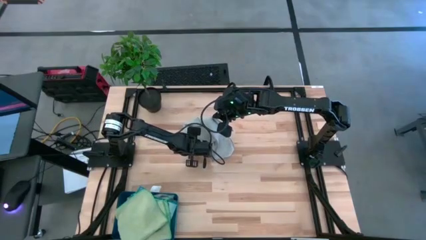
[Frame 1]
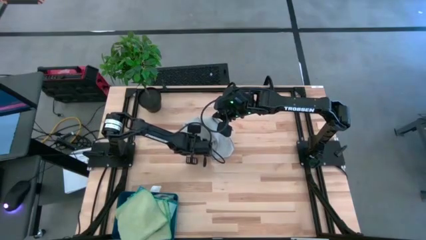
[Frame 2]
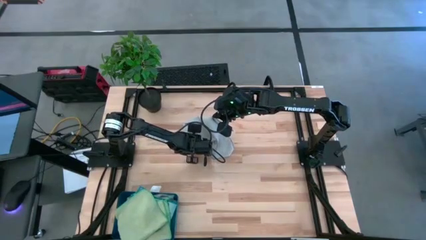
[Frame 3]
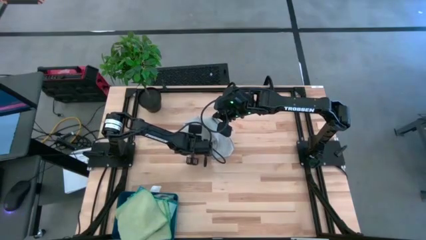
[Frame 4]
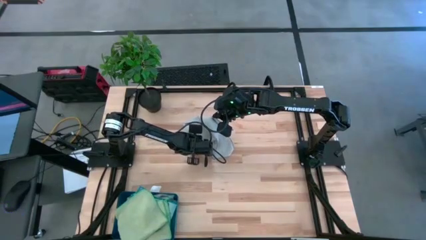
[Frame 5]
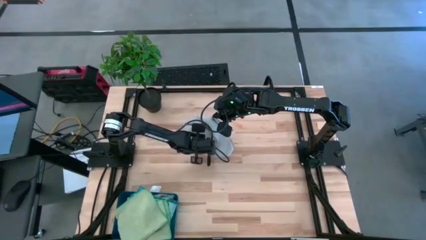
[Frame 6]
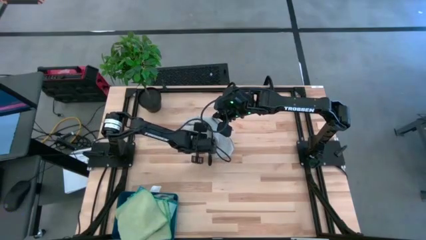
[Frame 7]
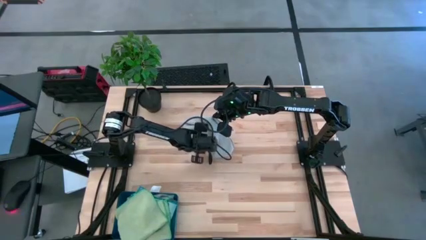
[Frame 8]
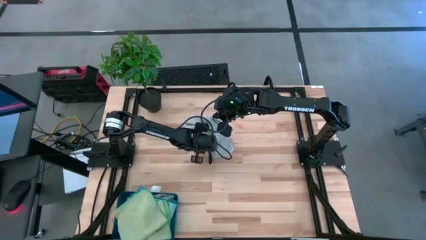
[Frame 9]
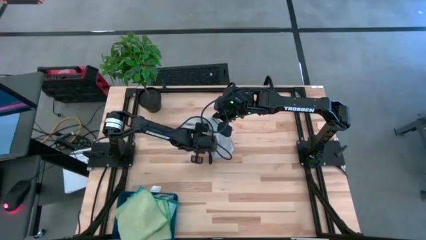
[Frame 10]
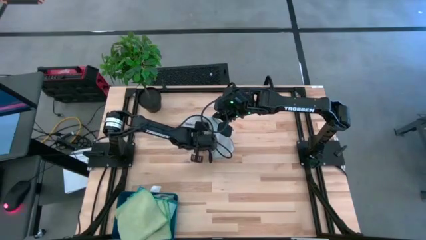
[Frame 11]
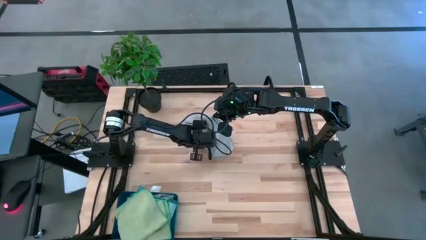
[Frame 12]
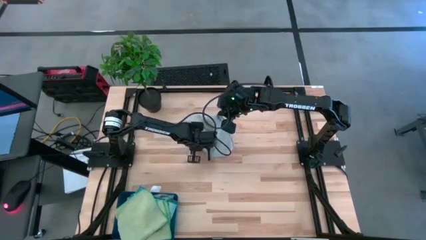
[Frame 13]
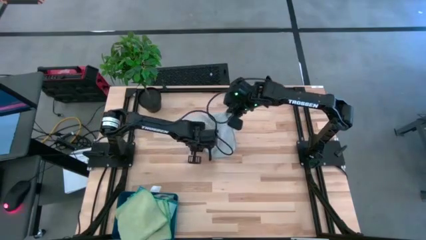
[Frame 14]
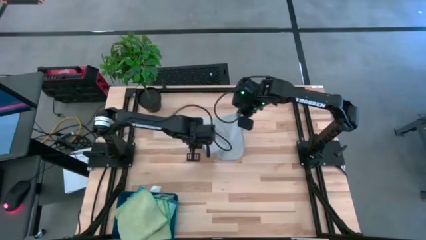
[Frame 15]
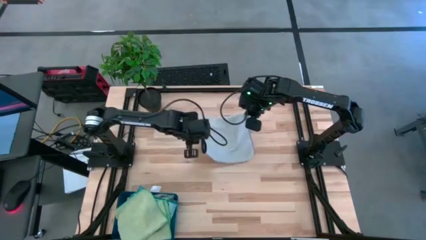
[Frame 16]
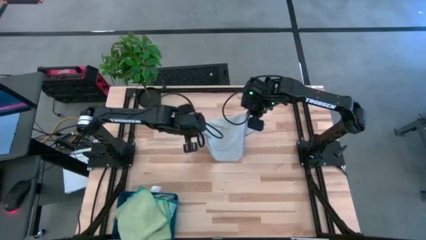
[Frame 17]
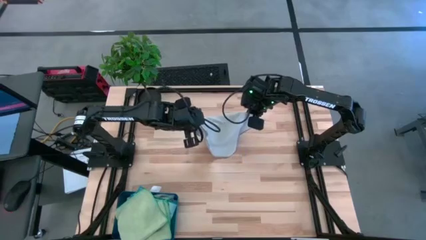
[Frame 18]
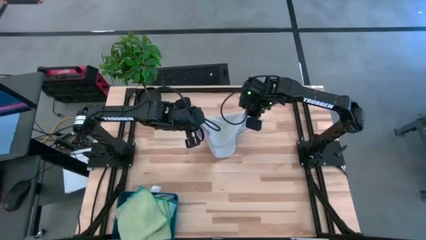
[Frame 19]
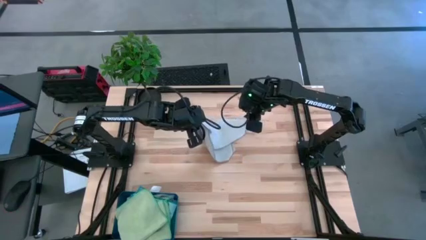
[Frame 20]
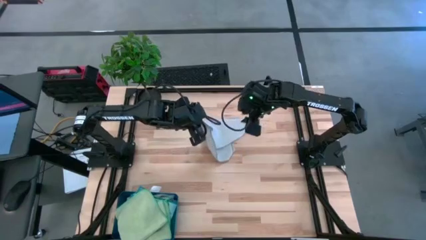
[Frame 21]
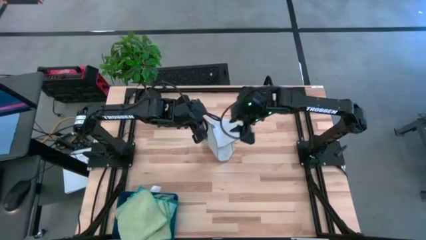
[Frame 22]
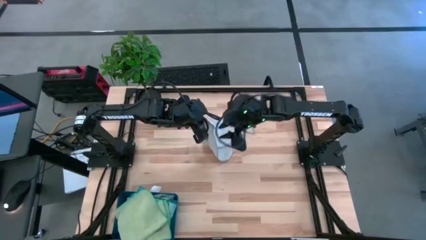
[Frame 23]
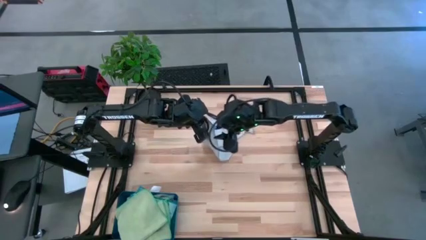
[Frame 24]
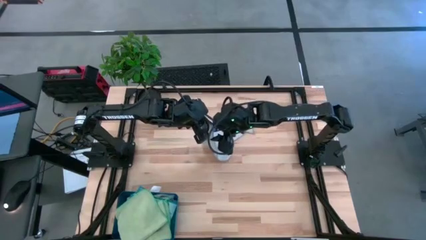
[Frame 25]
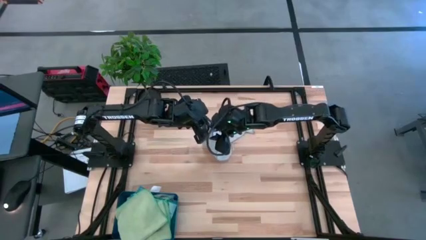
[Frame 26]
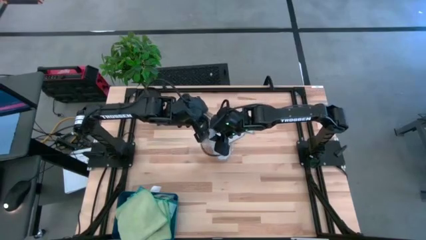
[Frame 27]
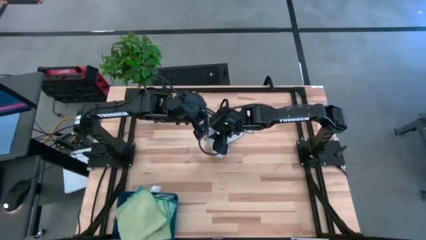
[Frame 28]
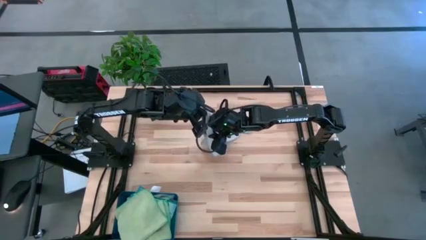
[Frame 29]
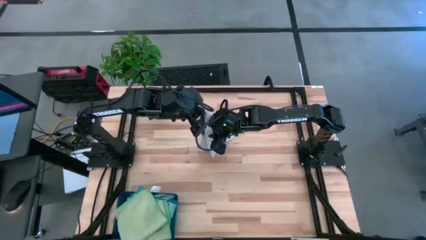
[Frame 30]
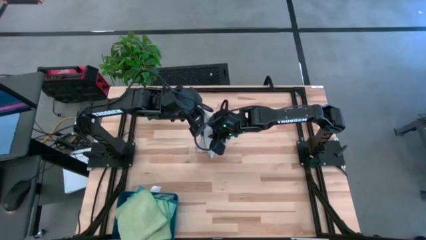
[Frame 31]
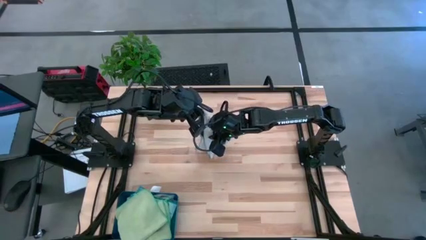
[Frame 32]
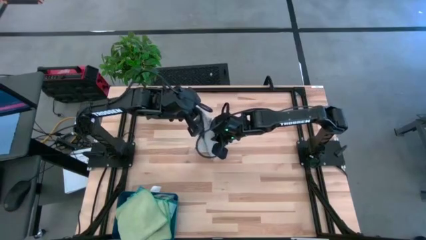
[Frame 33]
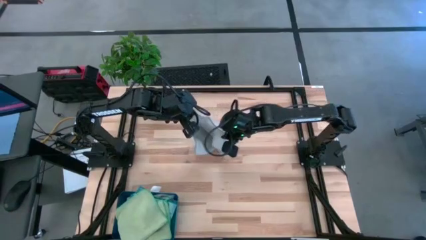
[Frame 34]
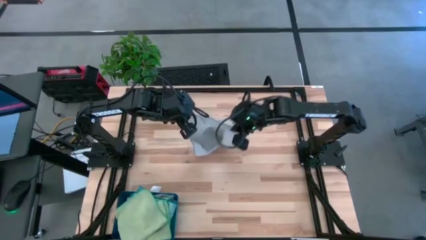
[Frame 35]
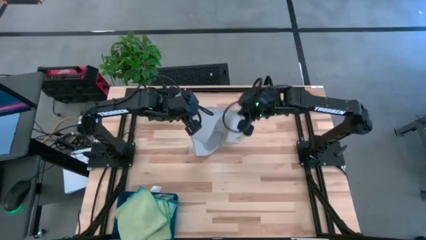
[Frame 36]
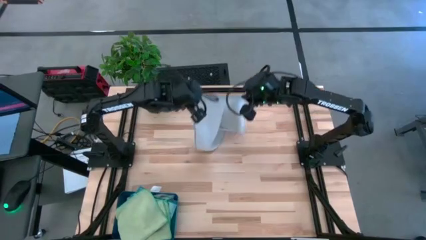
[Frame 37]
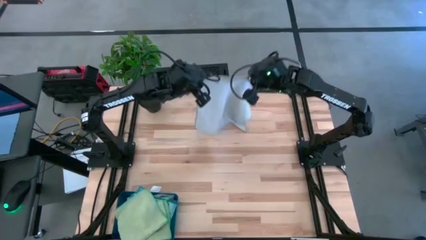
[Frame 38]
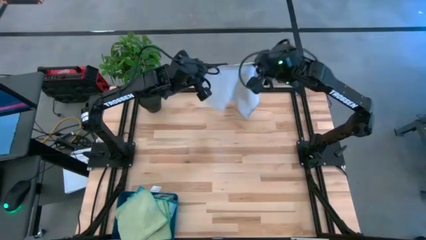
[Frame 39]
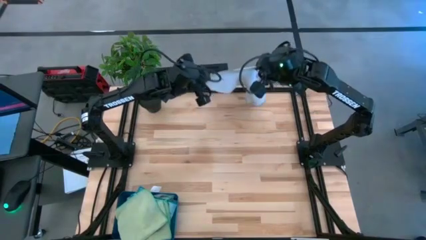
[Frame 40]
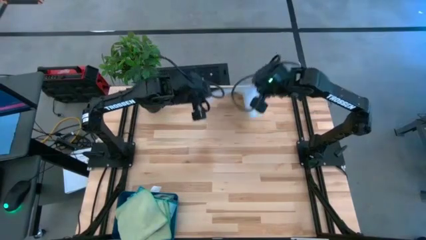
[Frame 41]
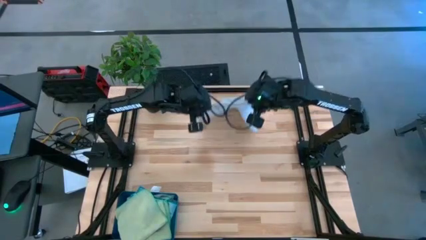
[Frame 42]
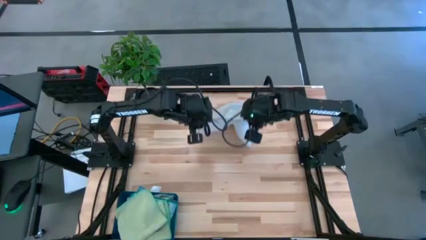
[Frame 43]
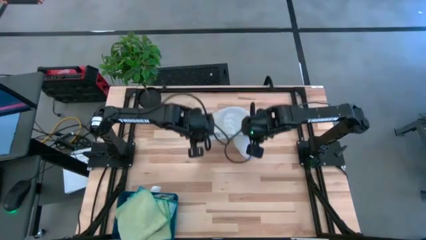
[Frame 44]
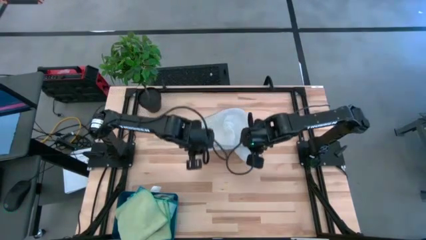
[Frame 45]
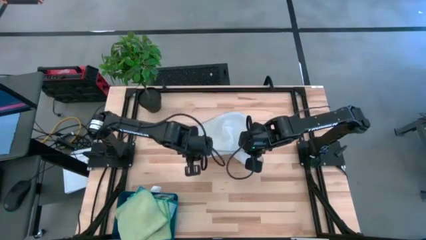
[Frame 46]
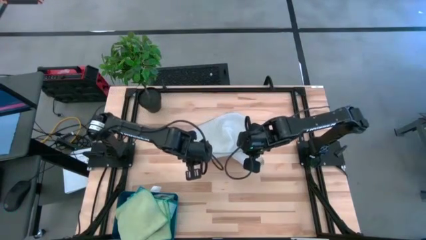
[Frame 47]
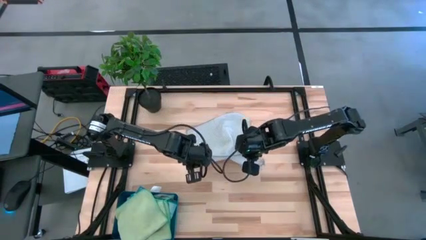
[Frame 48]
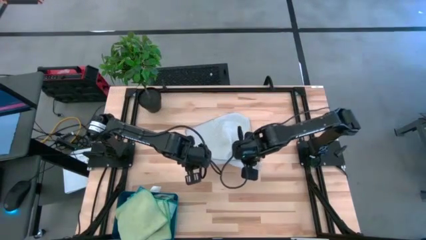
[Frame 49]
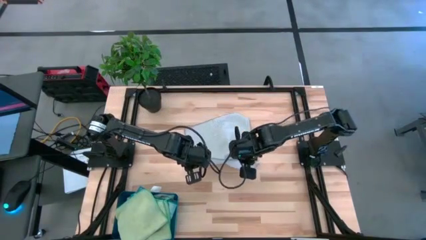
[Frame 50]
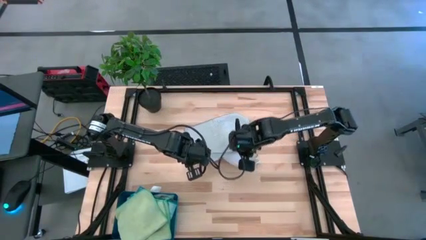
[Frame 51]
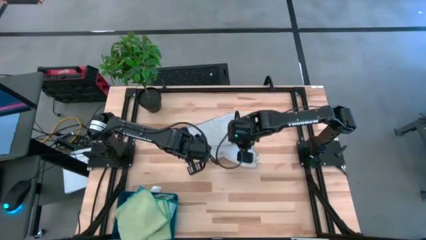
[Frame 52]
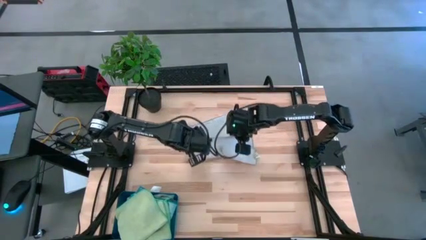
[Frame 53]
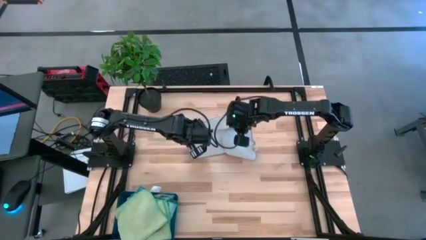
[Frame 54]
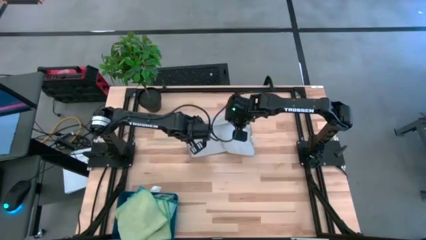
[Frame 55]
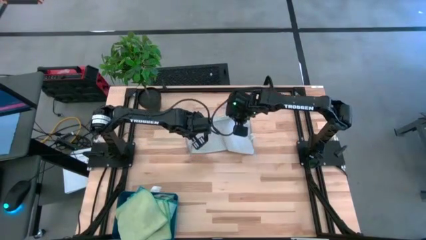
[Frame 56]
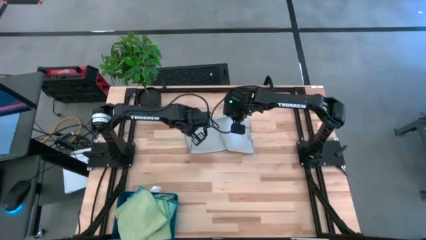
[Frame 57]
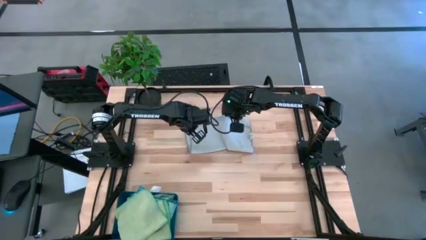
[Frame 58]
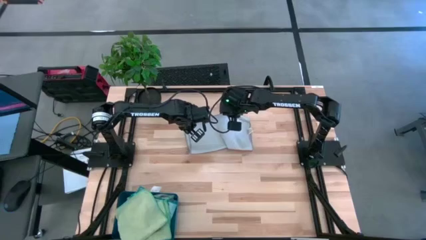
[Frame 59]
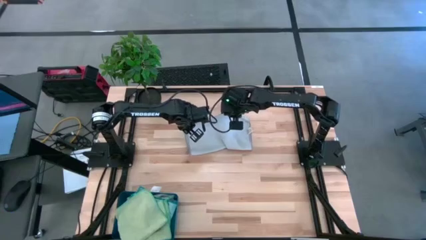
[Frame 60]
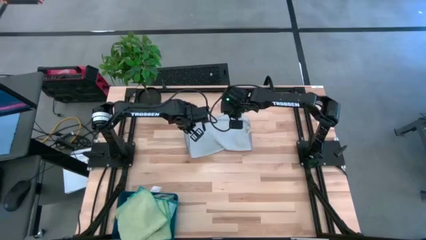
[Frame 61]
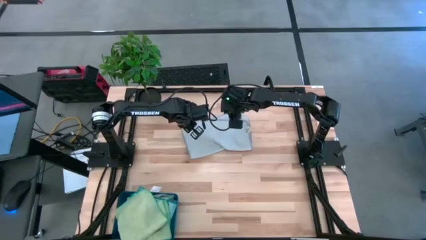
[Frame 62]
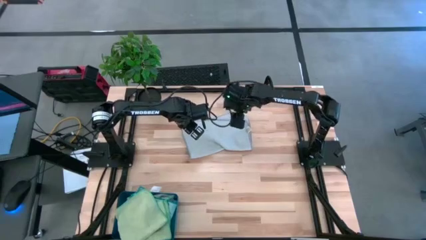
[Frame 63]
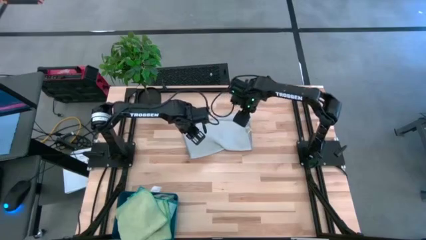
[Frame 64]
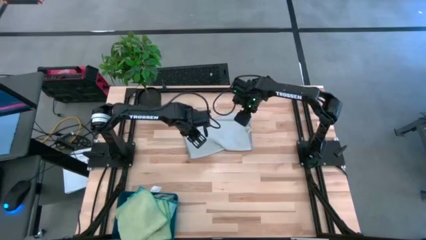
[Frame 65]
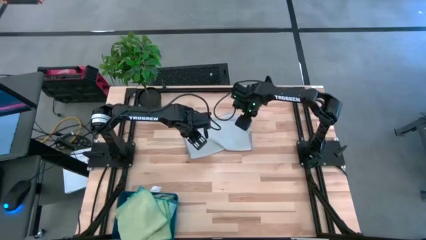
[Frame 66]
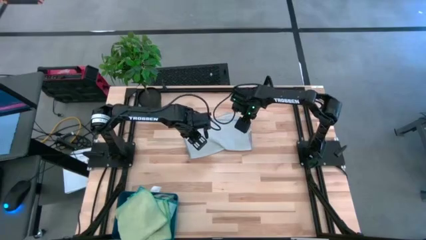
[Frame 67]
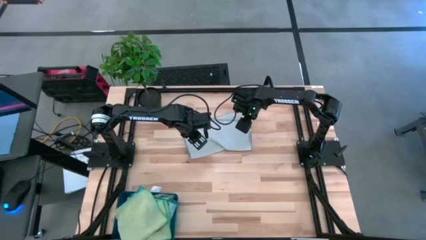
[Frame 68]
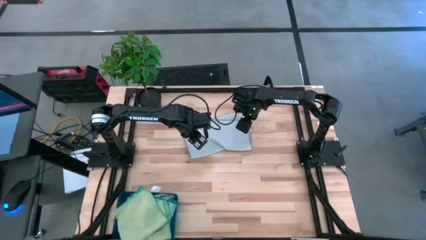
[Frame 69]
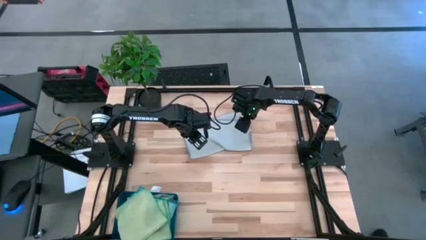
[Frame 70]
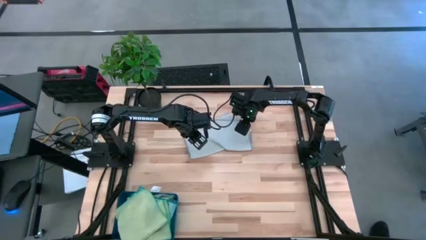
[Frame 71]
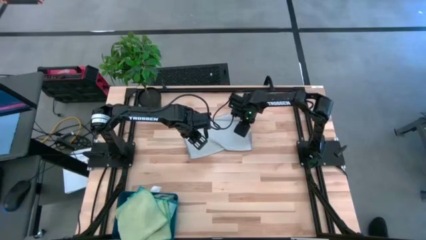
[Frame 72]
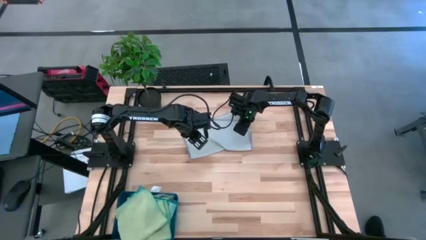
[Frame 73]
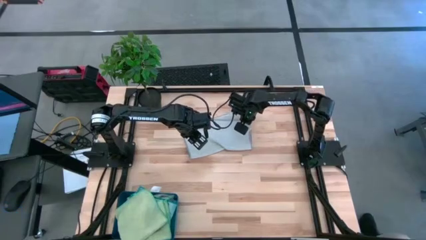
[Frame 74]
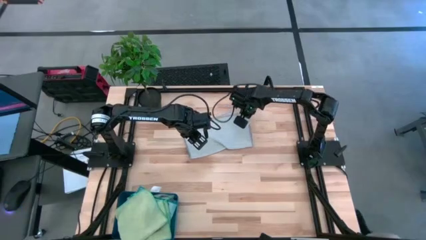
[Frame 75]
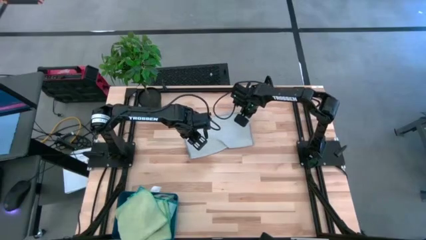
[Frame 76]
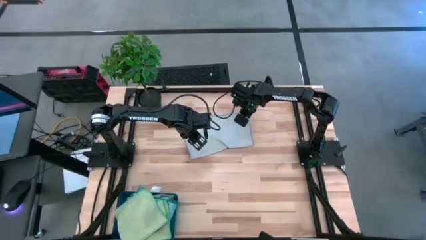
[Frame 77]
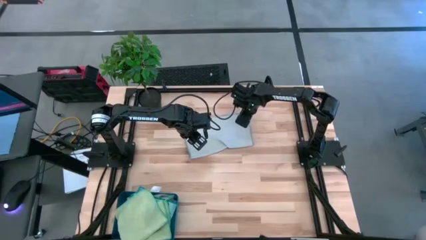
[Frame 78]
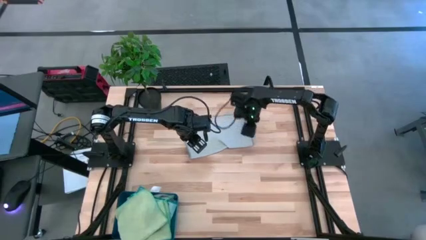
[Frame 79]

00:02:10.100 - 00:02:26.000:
Task: Fold microfiber towels
Fold the gray microfiber towel

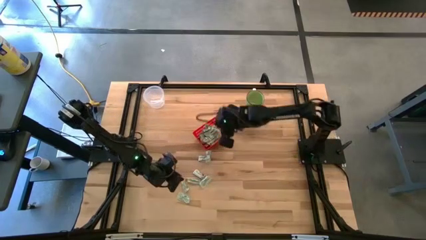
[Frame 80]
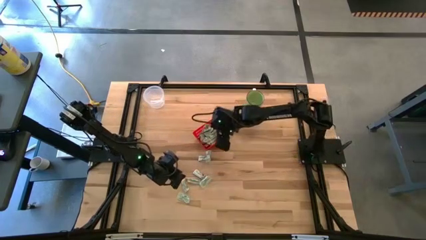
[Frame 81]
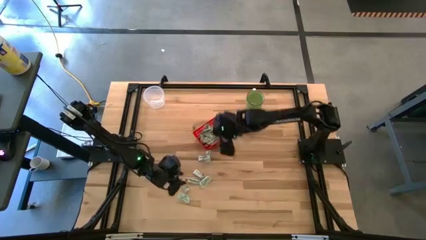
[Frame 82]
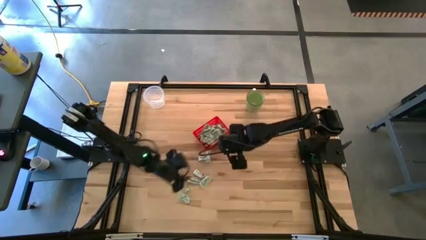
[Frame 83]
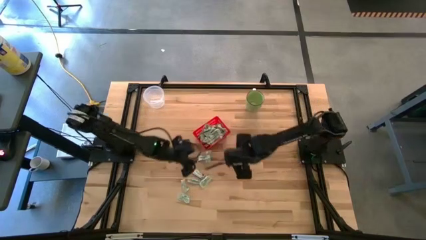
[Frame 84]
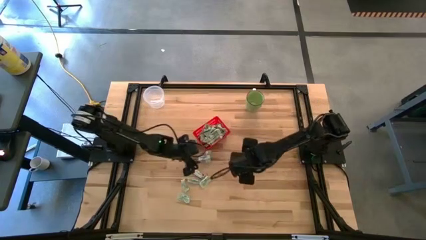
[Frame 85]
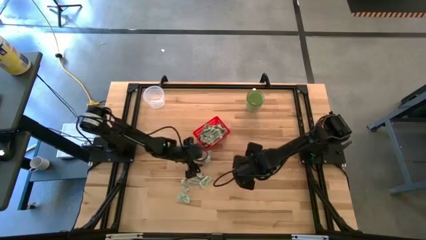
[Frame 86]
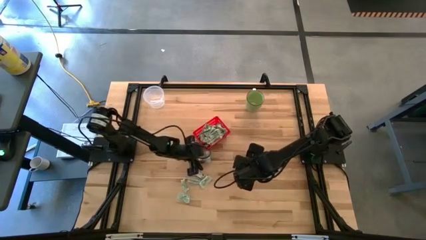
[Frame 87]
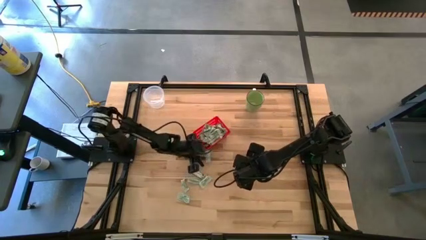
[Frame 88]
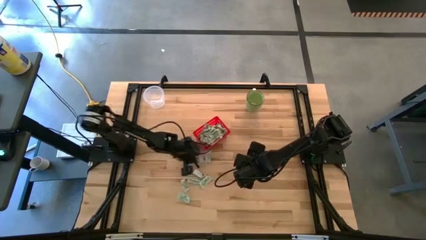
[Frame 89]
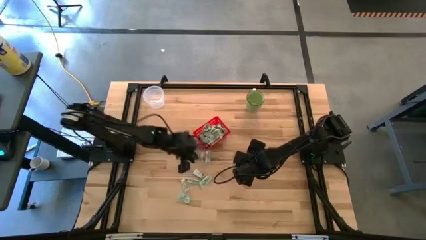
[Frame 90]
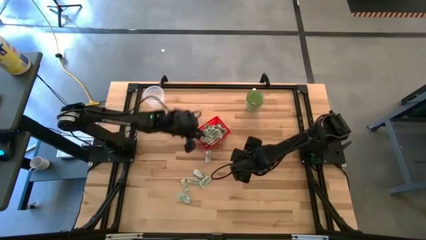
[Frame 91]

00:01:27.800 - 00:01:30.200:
Task: Pick and place Stevia / Truvia into bins
Put the stevia packet into the red basket
